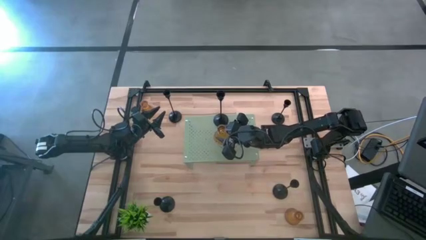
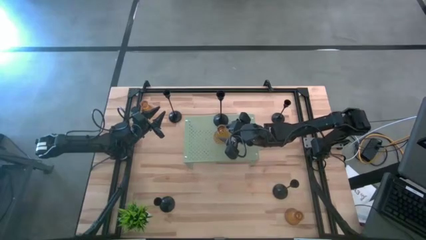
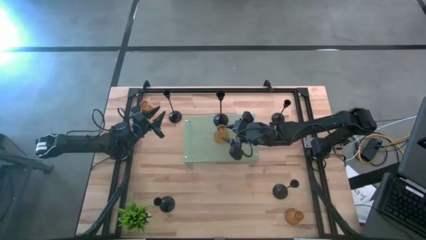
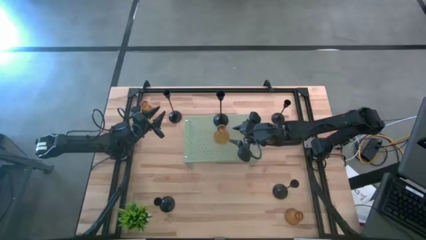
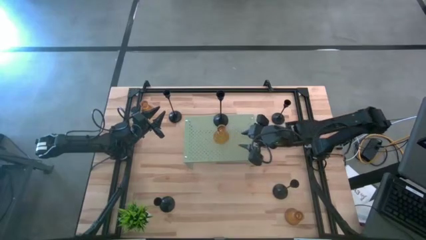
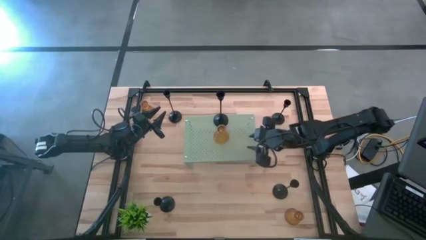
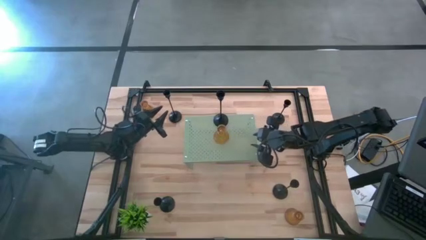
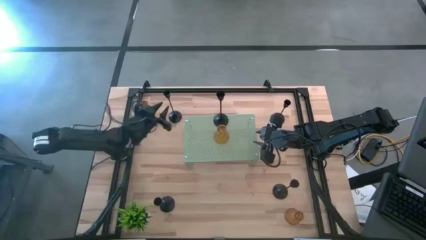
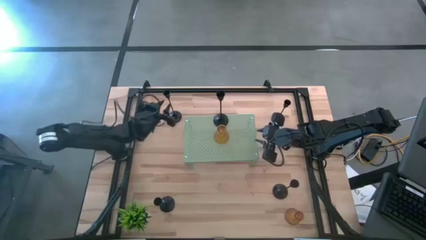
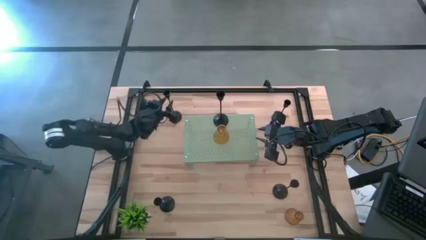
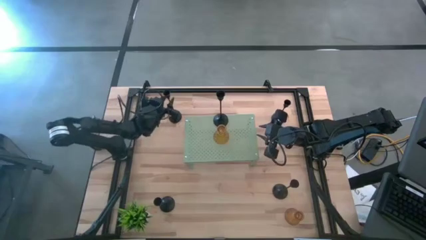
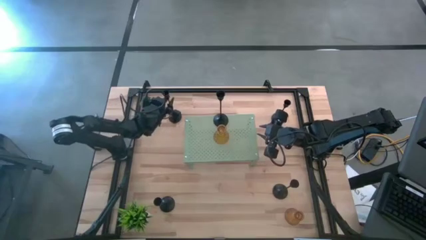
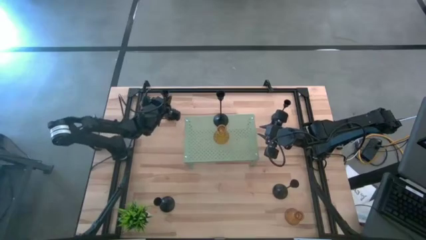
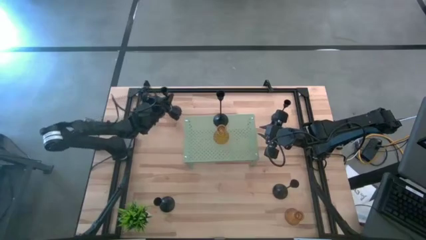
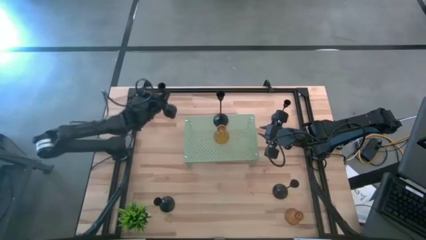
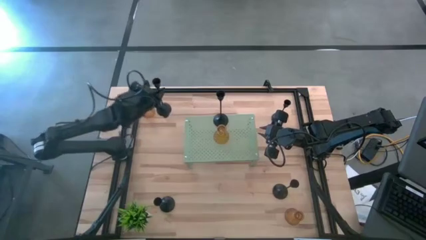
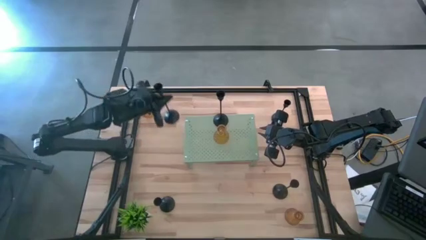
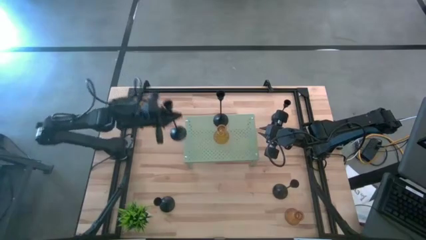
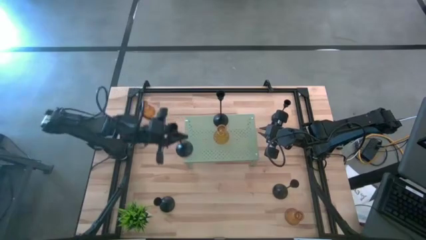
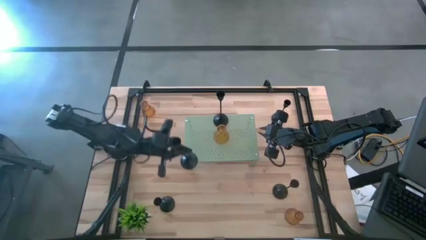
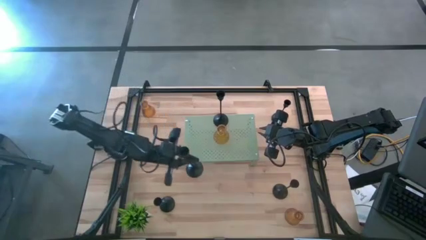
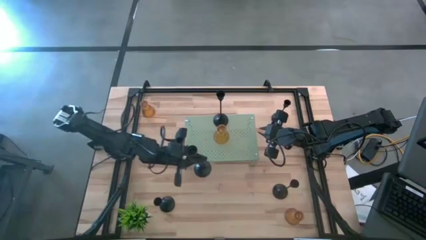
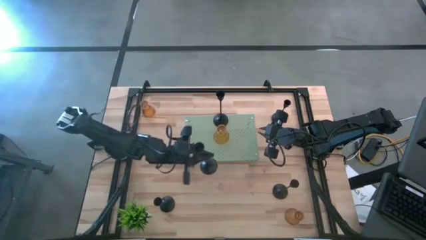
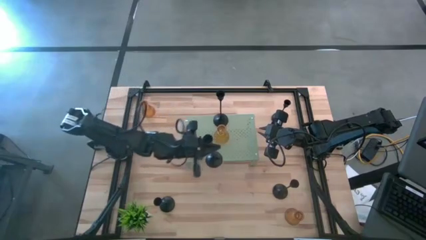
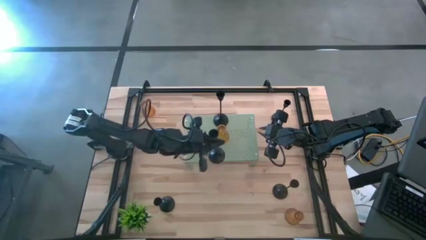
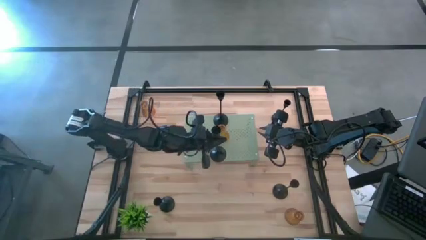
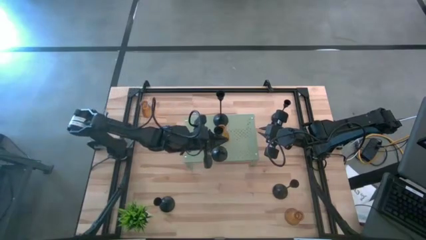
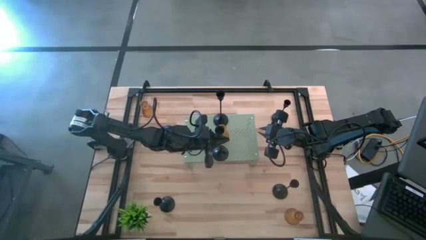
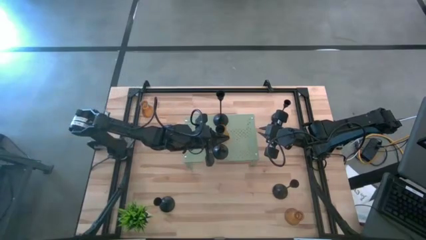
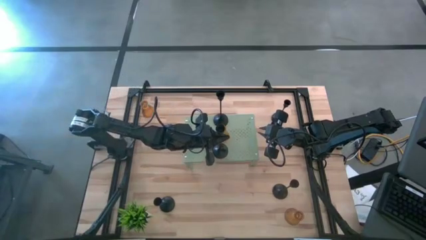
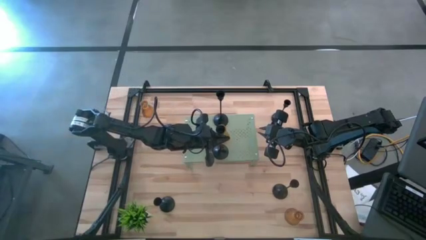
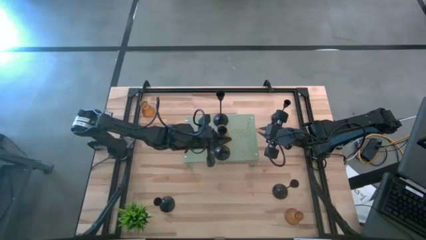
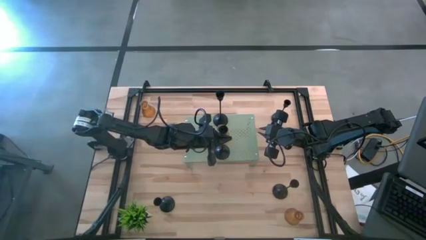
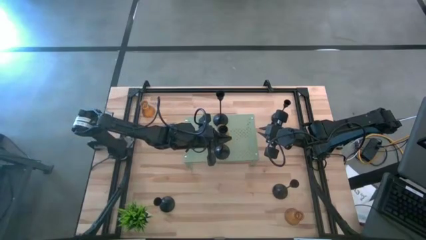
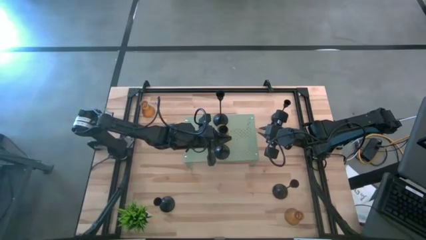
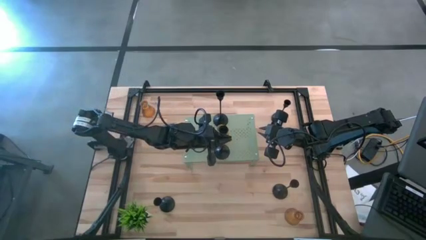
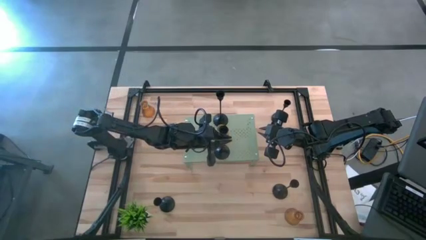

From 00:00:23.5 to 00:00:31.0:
Task: Pick & Place candle stick holders
Put the black candle holder on the shelf
